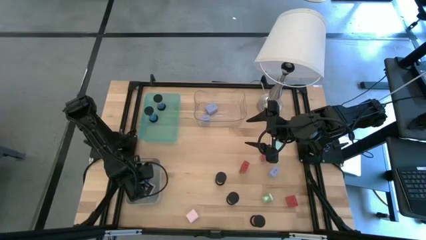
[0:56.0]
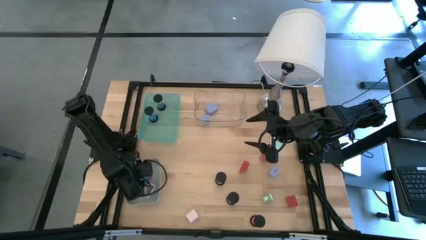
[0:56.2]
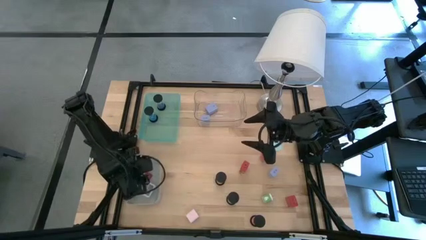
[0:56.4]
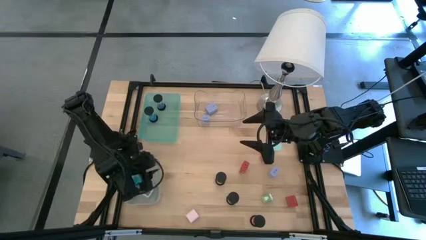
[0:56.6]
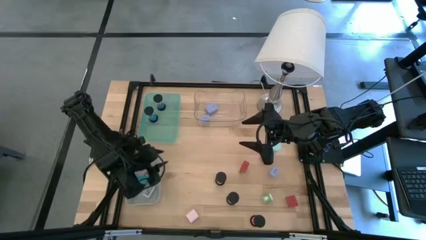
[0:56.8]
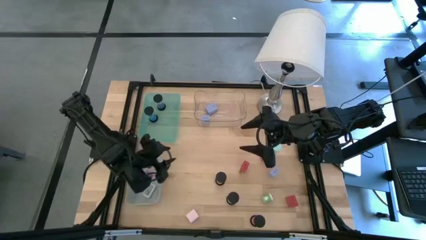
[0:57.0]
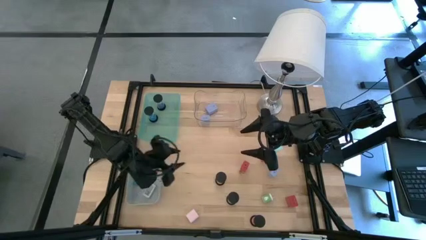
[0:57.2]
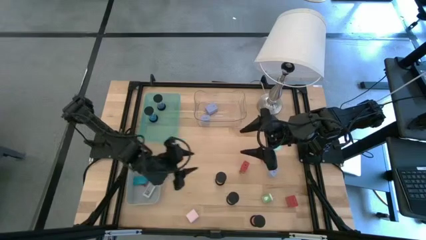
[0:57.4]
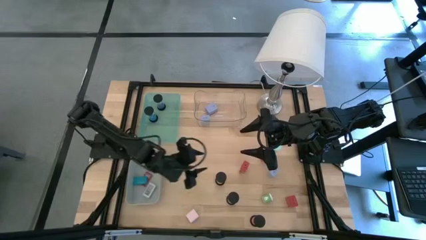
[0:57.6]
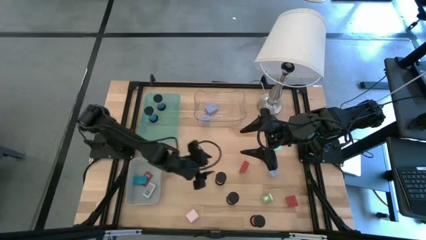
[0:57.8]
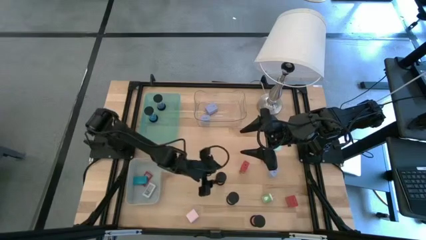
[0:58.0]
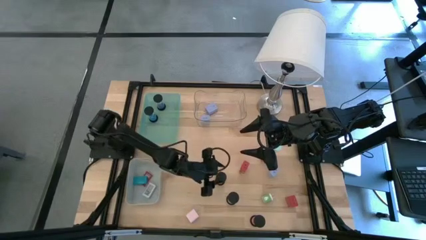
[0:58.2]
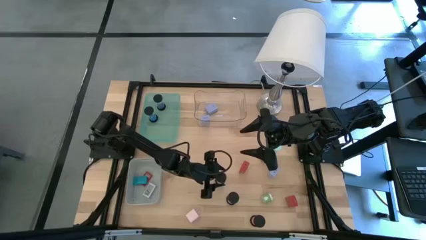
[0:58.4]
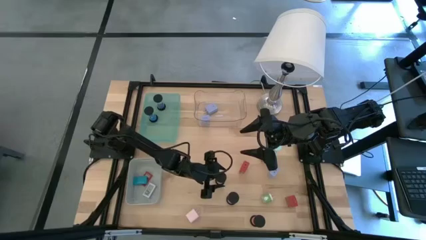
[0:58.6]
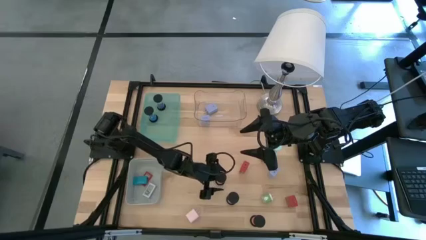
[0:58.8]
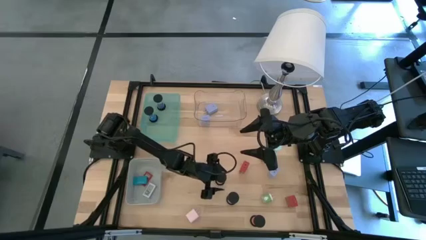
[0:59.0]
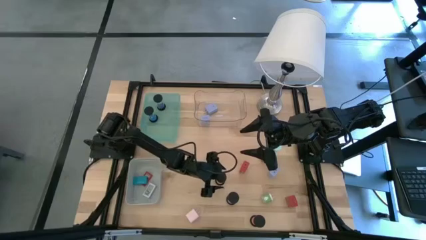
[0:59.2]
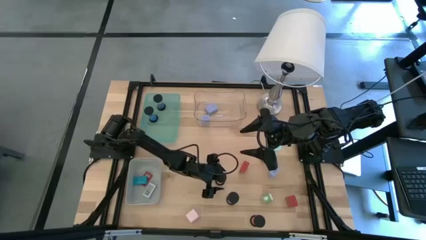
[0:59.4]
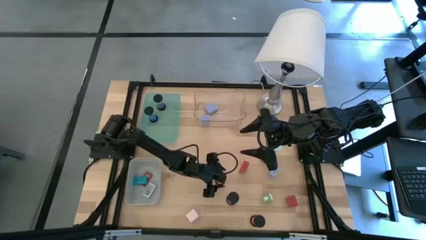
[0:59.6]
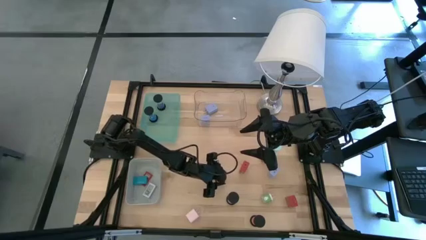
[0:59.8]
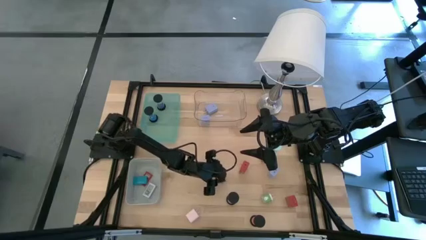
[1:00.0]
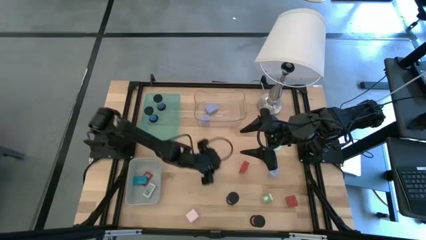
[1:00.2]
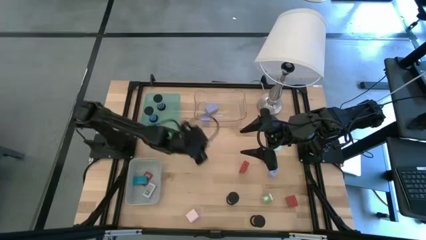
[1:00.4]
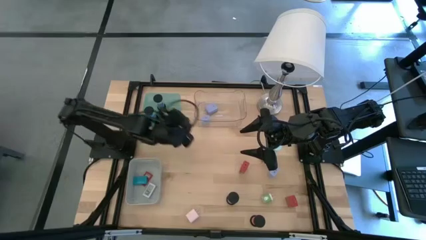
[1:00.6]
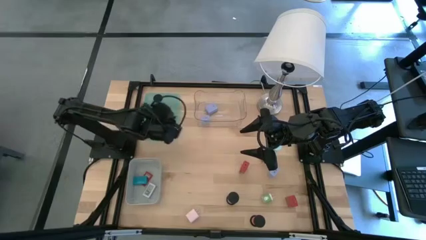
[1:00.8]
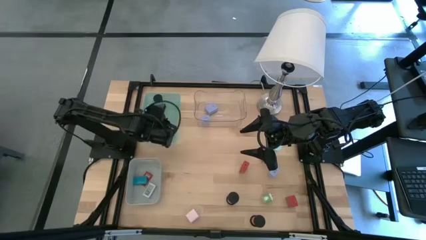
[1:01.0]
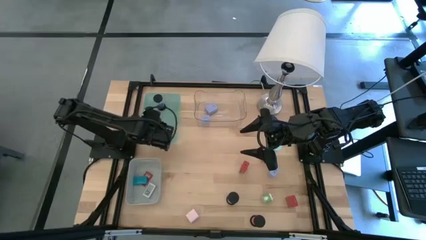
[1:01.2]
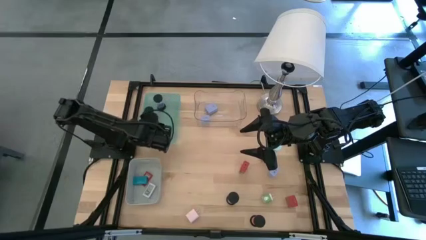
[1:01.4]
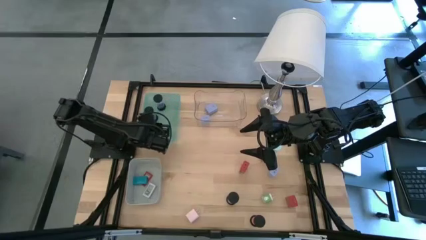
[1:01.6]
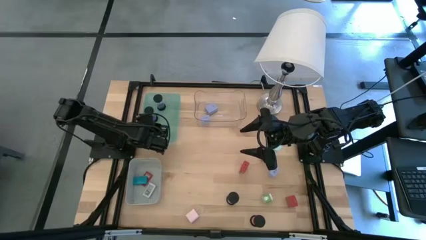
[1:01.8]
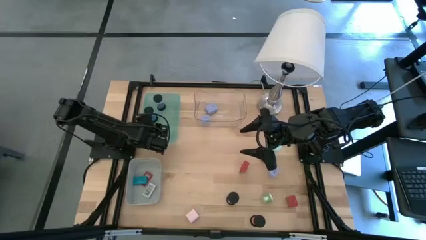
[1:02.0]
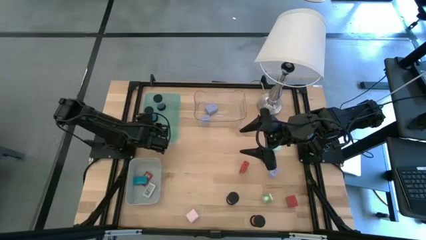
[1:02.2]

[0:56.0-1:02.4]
Task: Pick & Place Office items
Put the orange hourglass into the green bin

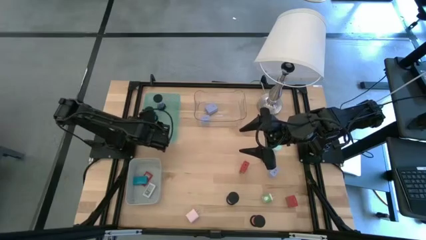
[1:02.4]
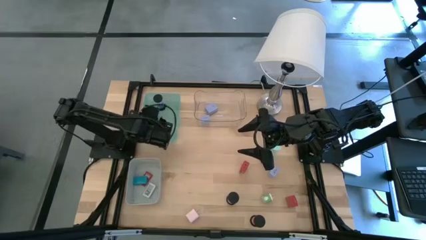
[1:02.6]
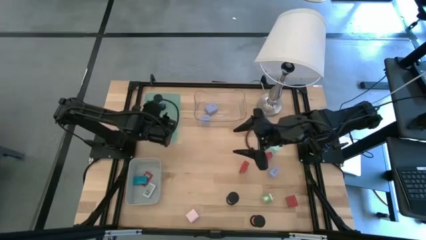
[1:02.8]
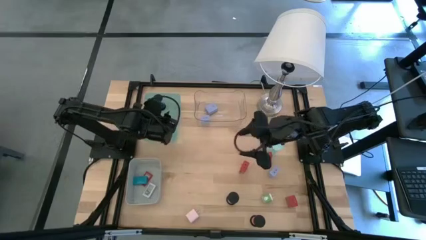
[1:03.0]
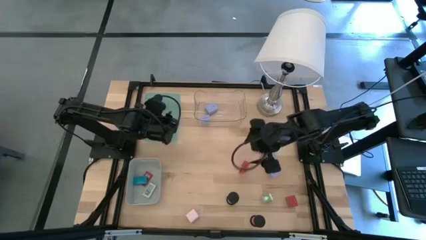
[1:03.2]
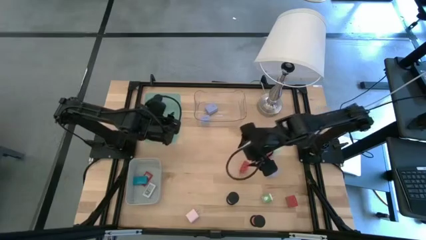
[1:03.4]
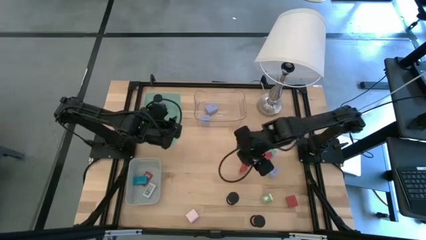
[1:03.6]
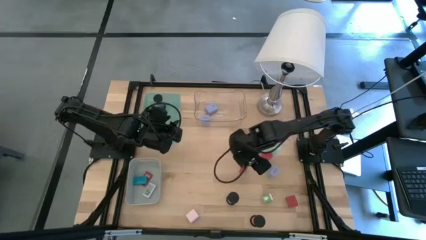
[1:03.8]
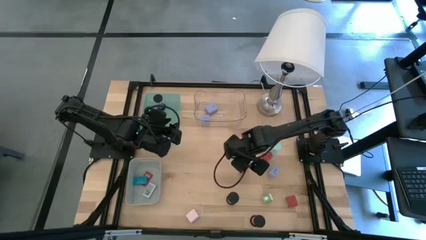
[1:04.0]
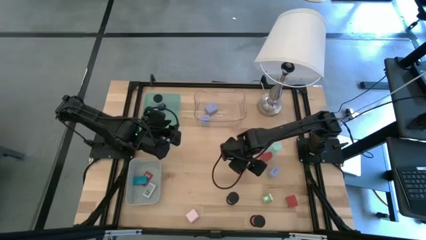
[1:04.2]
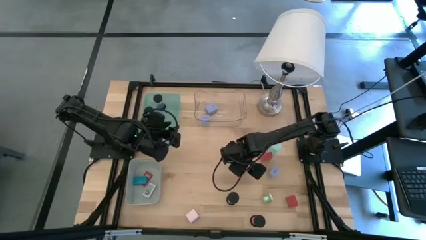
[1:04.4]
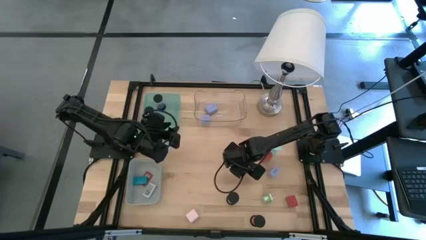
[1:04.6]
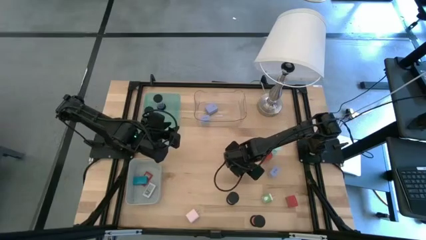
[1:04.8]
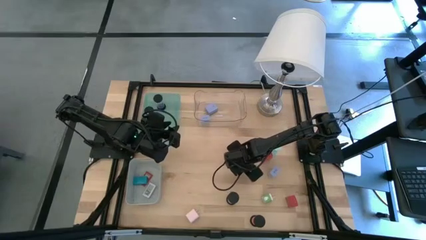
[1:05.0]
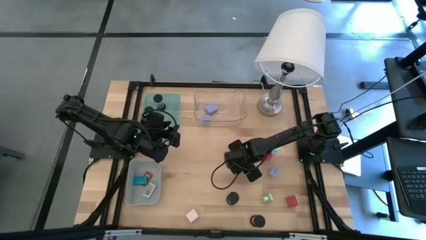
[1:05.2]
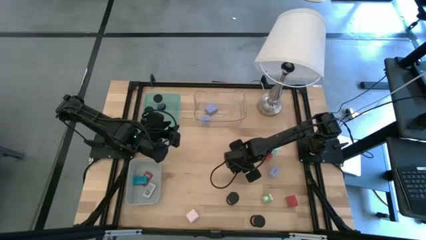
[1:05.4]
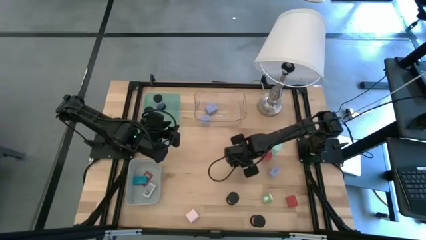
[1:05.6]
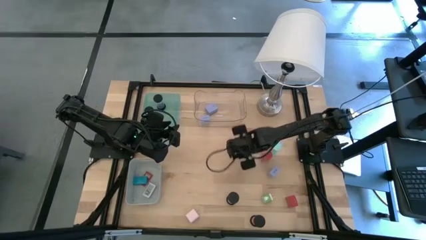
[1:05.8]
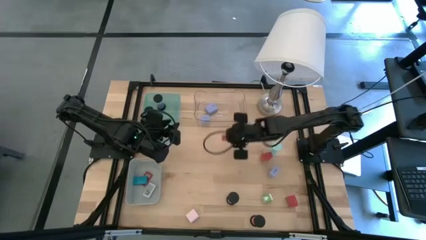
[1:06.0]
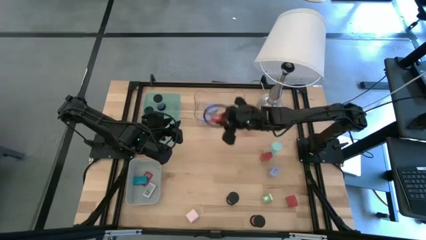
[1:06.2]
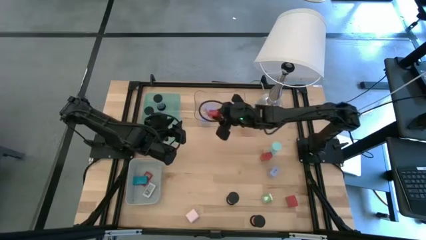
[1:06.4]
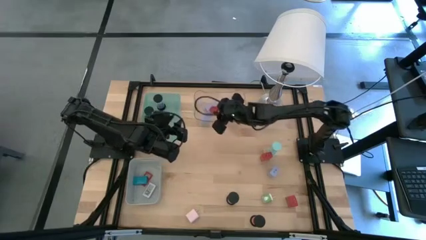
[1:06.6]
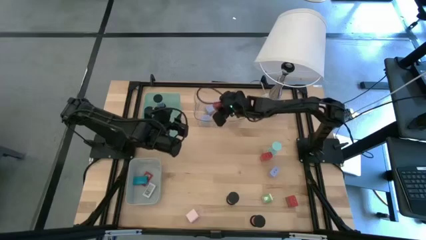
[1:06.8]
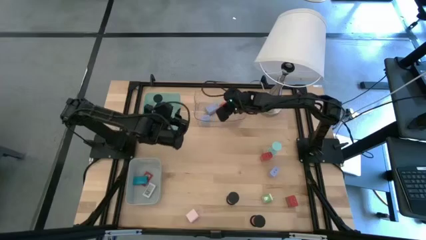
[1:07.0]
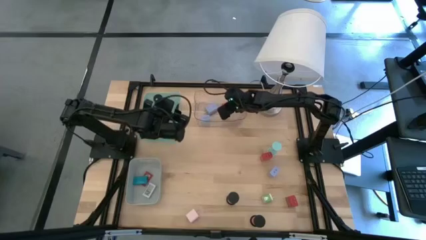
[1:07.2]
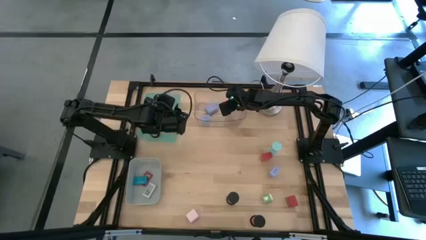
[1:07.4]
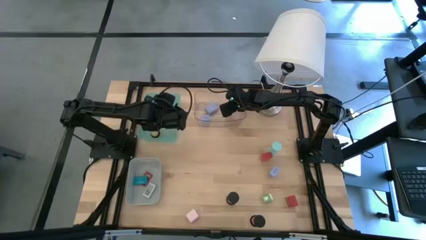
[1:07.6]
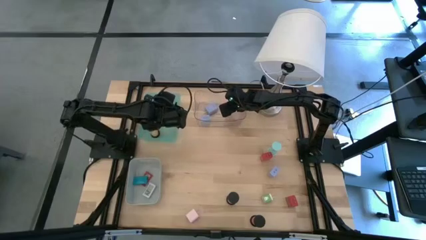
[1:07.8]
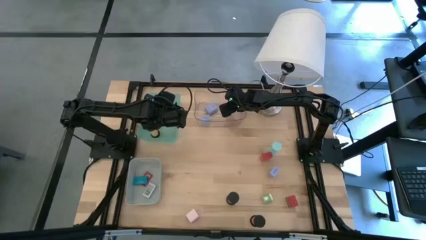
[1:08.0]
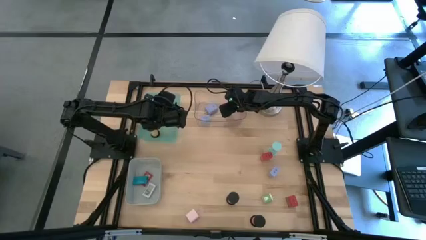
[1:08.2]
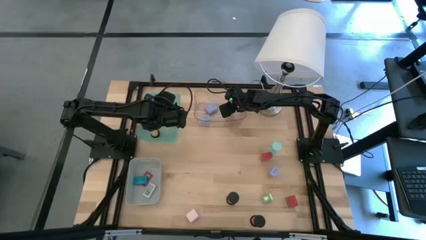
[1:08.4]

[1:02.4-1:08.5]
Put the top left red charger adapter into the transparent bin

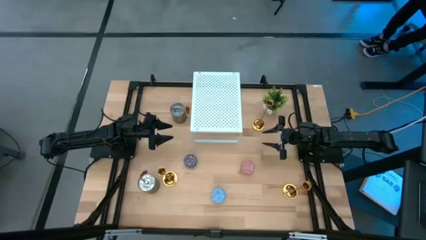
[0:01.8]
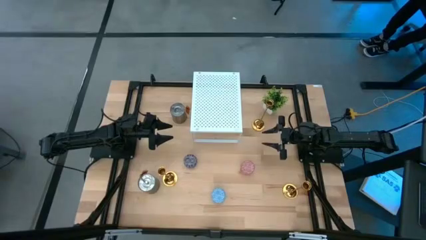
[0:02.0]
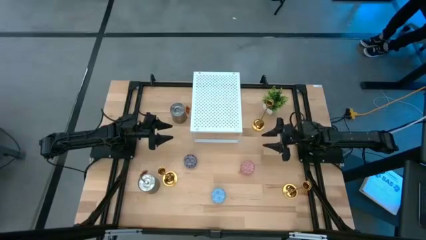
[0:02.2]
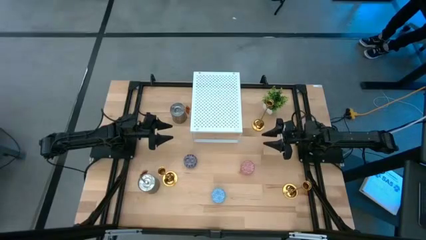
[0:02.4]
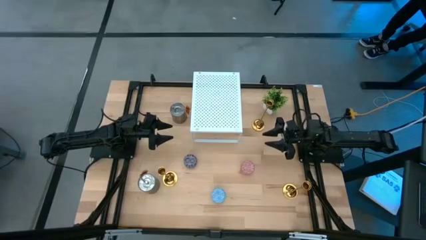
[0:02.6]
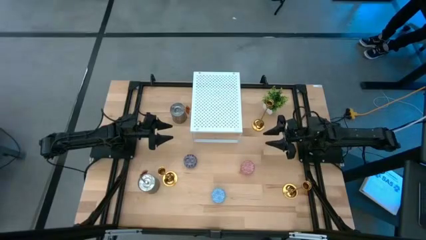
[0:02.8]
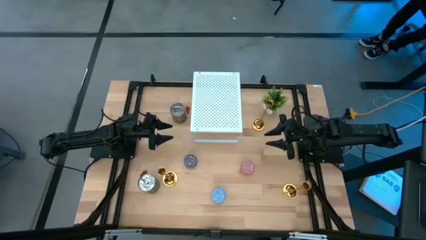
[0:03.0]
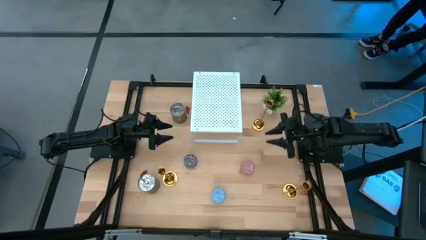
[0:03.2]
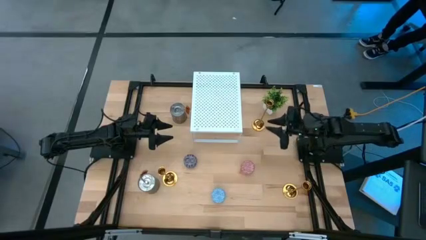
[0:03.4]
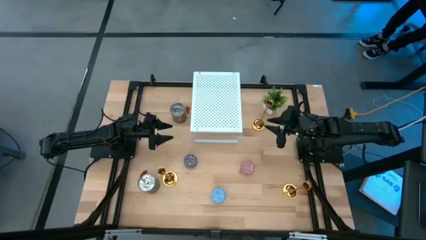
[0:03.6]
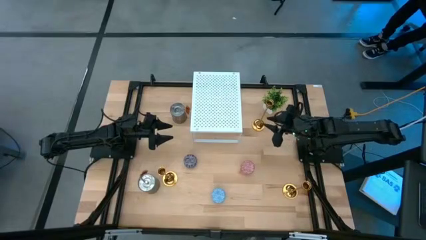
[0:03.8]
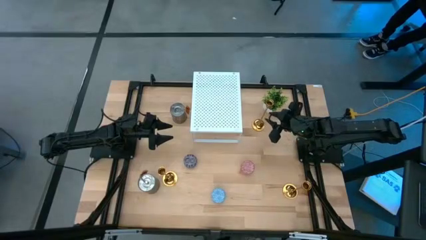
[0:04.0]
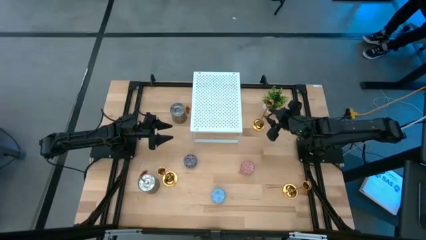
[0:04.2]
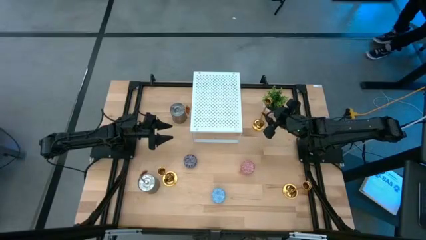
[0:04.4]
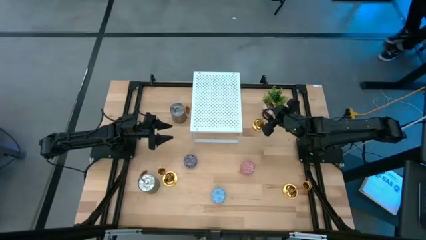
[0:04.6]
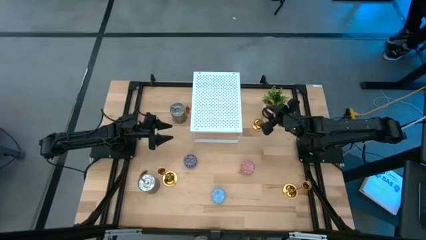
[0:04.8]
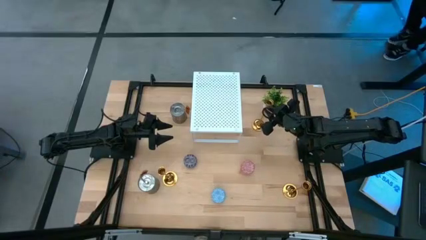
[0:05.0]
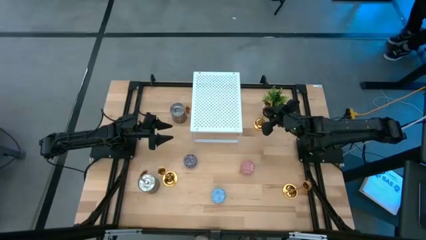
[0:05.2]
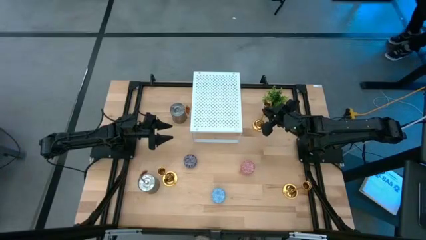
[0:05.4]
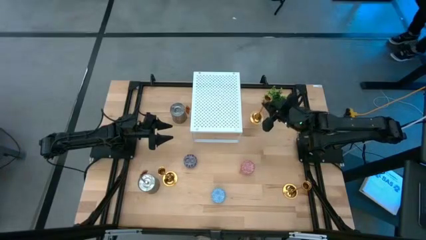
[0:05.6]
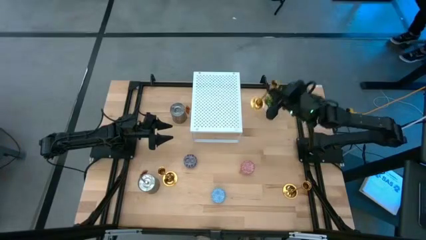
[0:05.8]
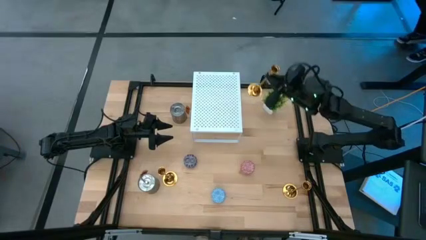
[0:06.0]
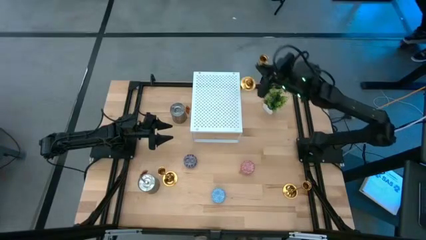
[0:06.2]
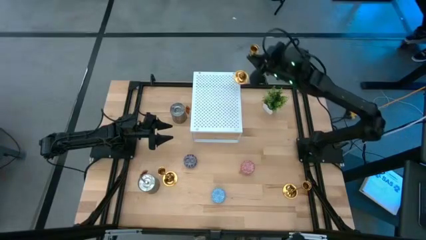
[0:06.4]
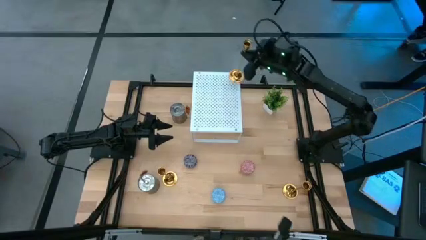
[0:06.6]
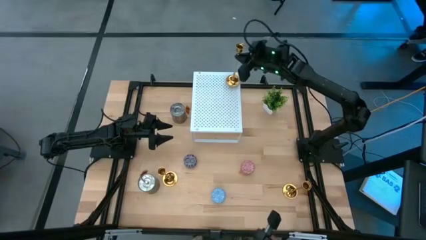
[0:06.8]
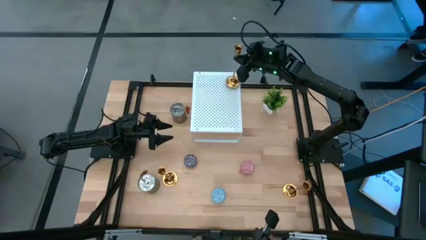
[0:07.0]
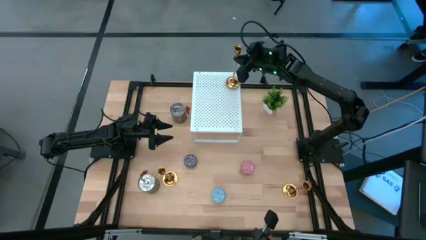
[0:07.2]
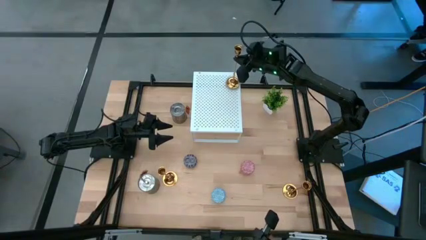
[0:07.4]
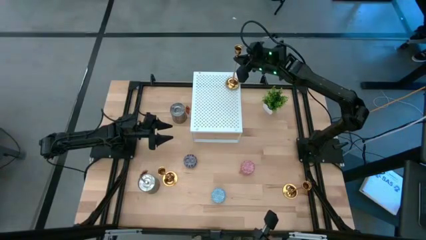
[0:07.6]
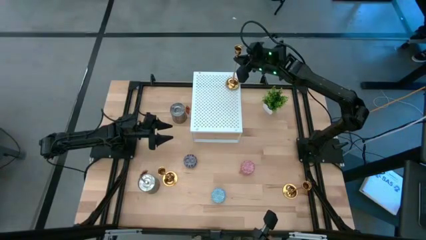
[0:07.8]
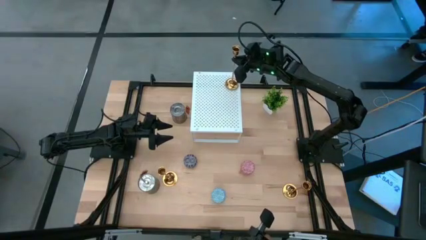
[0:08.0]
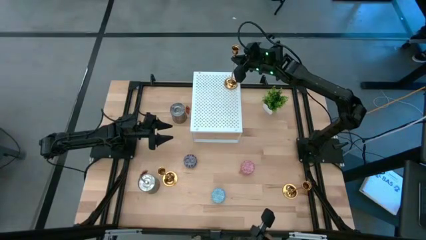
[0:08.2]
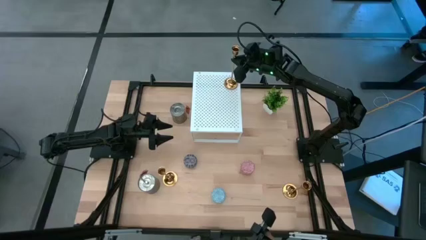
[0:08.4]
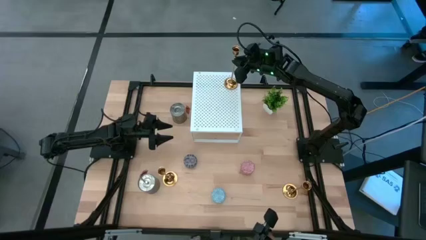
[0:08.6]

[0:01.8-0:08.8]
Task: Pick & Place candle stick holders
Put the top right gold candle holder on the shelf
